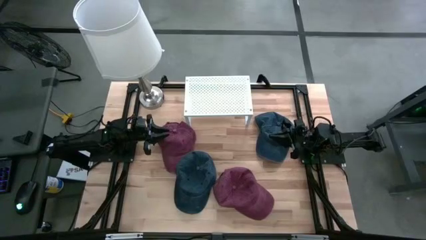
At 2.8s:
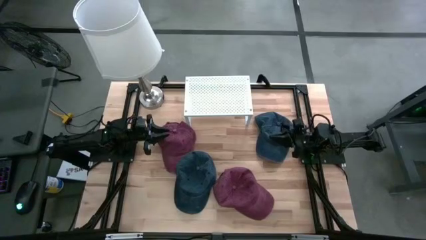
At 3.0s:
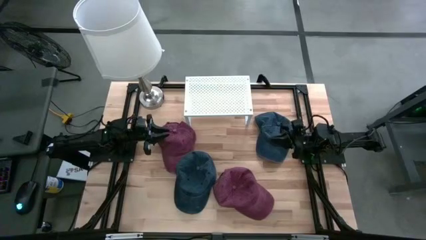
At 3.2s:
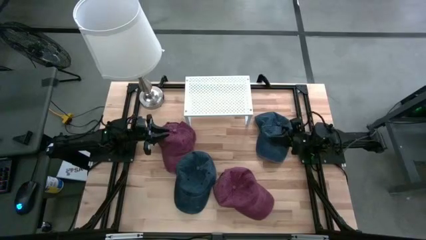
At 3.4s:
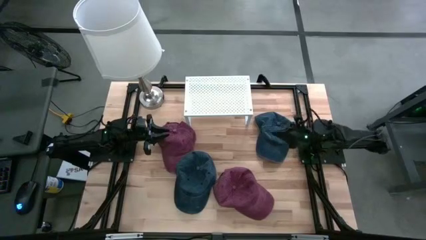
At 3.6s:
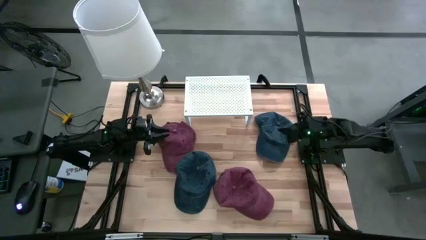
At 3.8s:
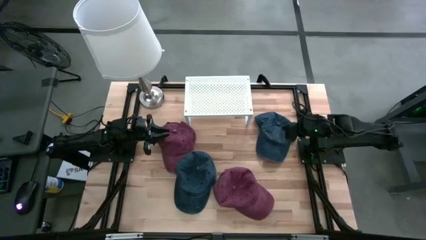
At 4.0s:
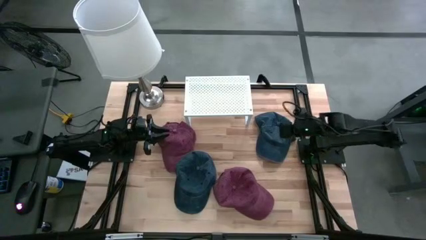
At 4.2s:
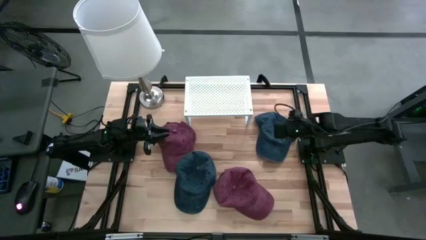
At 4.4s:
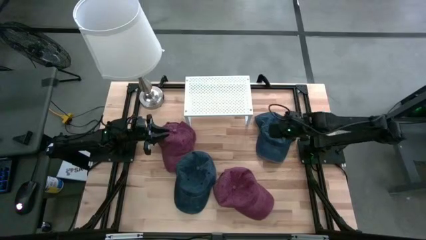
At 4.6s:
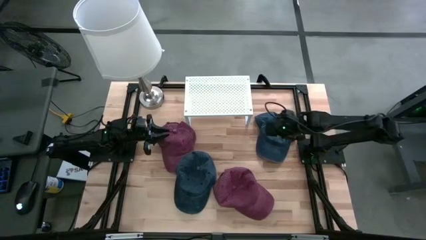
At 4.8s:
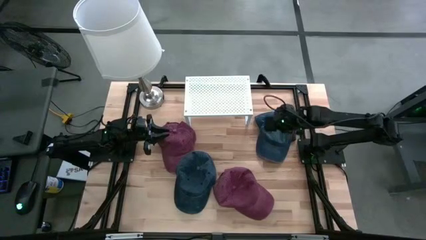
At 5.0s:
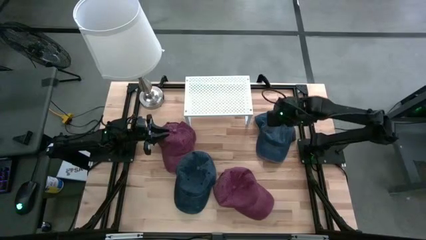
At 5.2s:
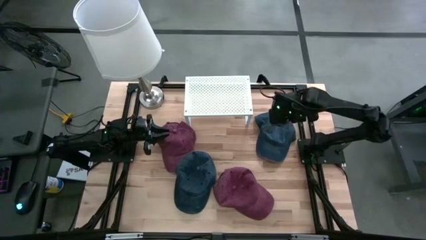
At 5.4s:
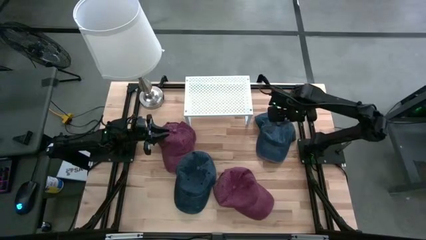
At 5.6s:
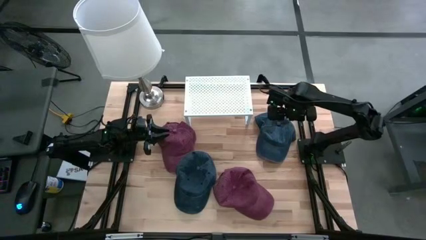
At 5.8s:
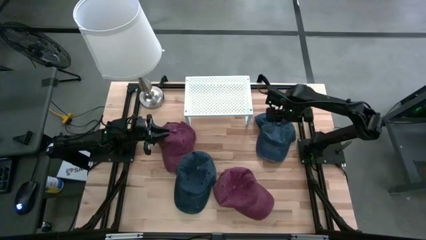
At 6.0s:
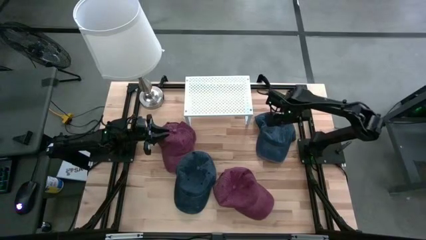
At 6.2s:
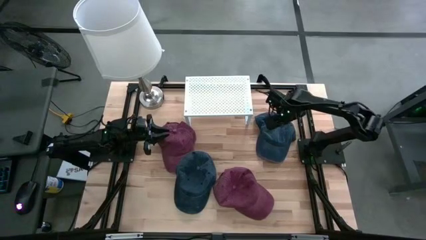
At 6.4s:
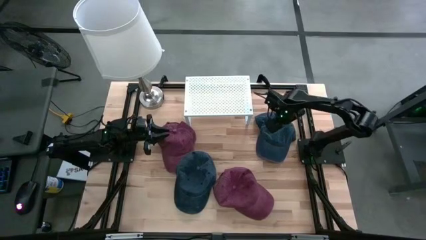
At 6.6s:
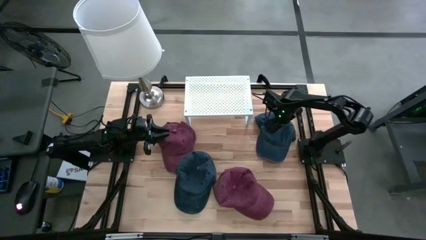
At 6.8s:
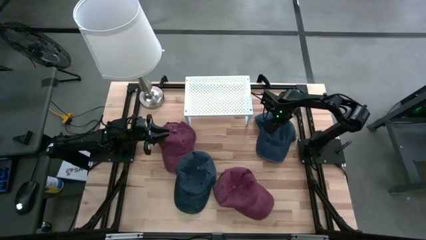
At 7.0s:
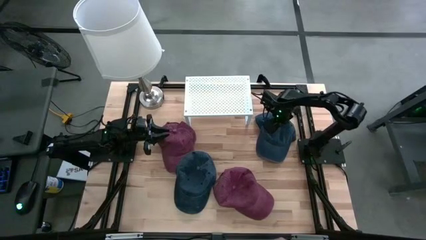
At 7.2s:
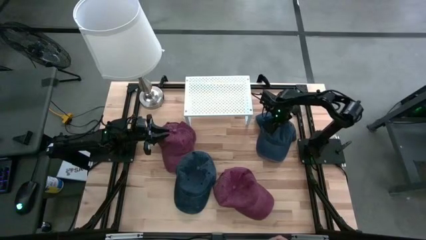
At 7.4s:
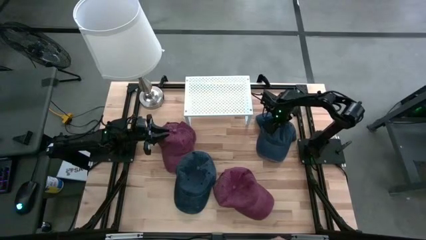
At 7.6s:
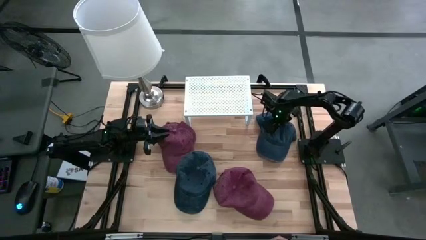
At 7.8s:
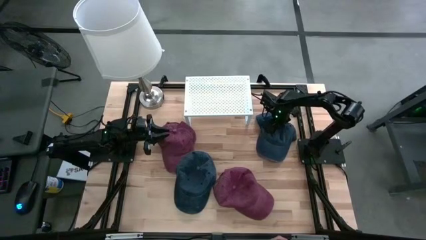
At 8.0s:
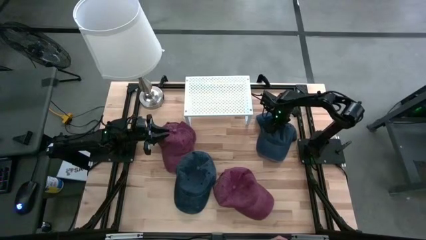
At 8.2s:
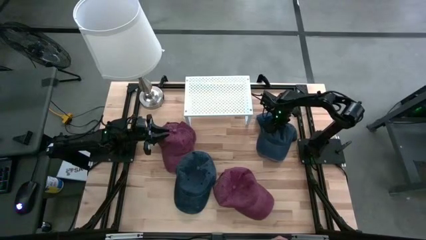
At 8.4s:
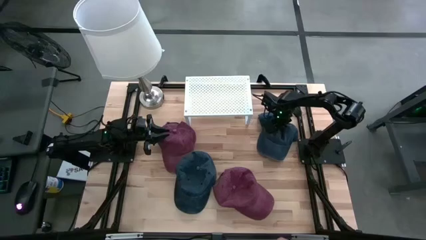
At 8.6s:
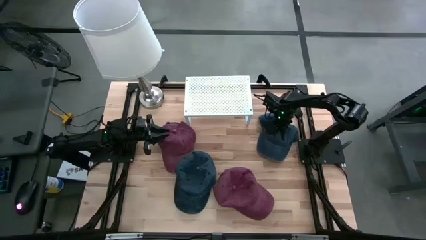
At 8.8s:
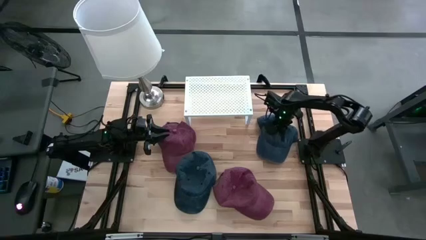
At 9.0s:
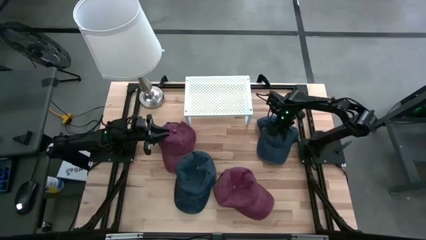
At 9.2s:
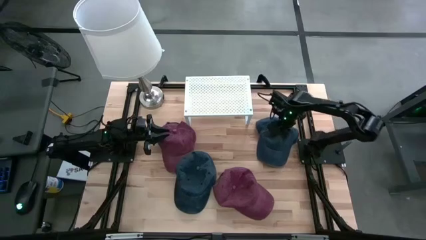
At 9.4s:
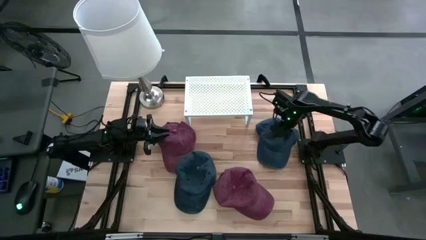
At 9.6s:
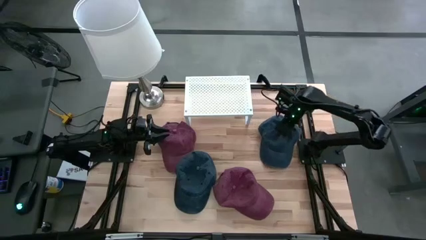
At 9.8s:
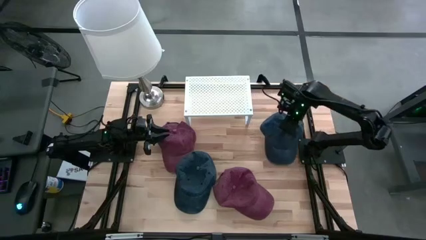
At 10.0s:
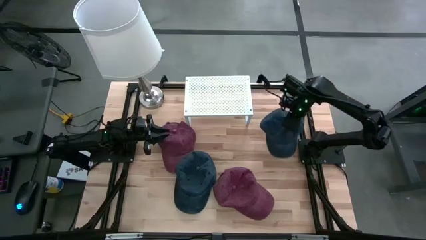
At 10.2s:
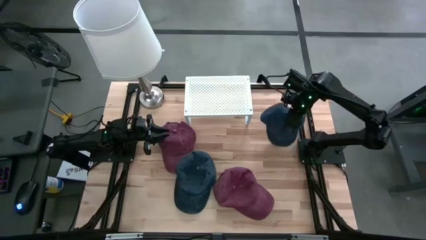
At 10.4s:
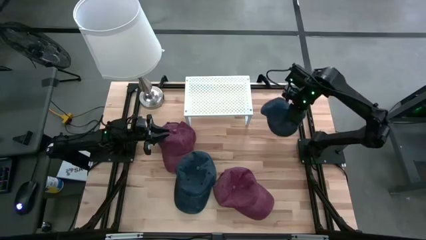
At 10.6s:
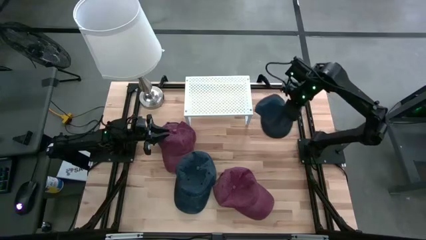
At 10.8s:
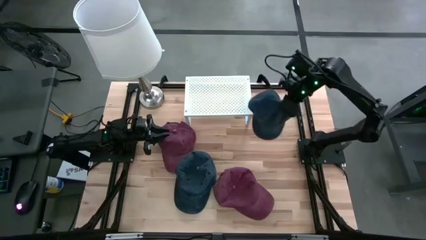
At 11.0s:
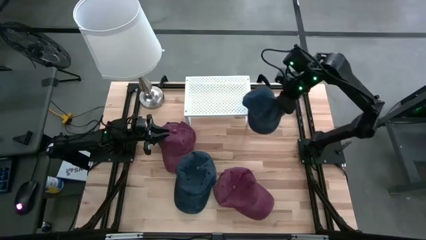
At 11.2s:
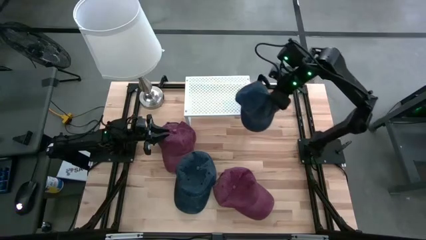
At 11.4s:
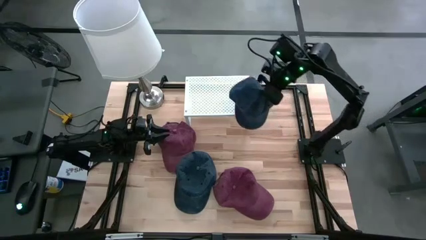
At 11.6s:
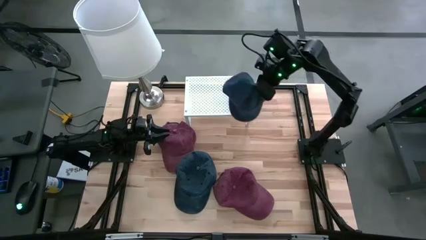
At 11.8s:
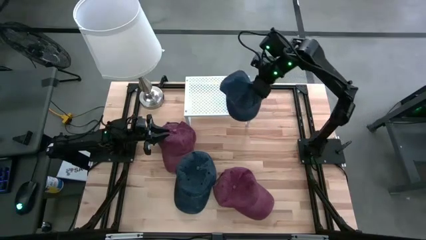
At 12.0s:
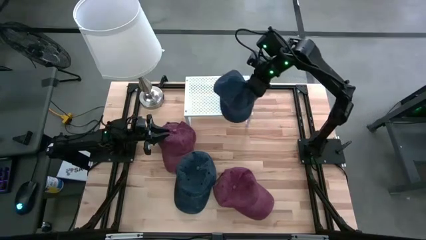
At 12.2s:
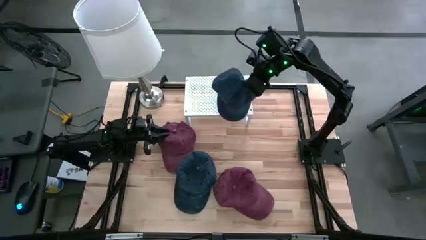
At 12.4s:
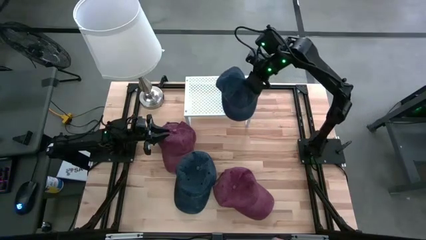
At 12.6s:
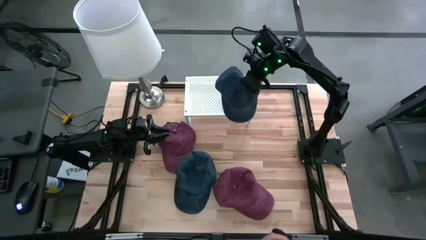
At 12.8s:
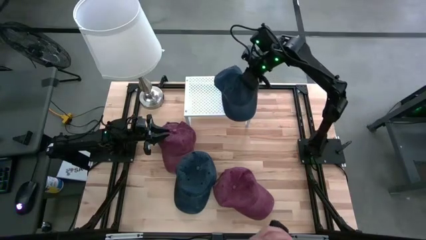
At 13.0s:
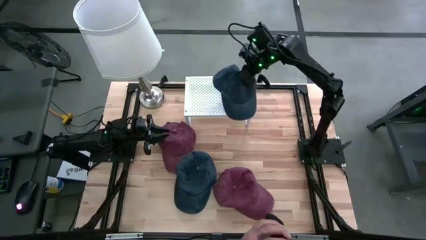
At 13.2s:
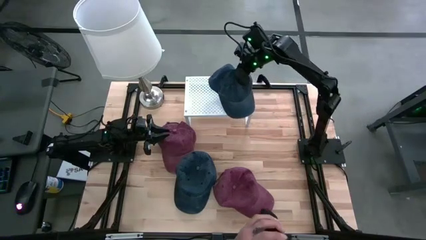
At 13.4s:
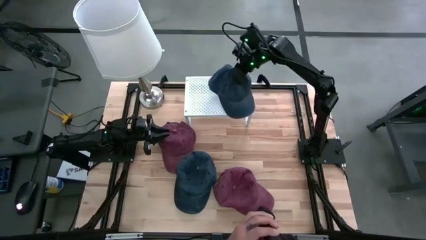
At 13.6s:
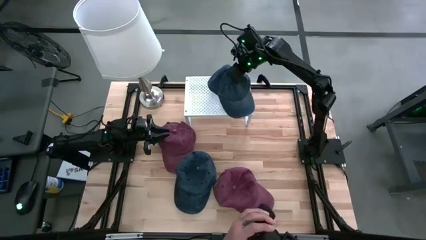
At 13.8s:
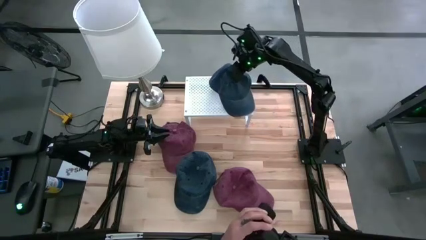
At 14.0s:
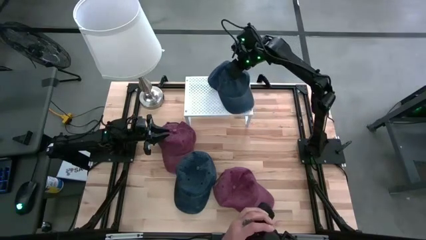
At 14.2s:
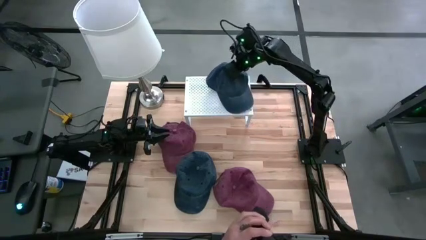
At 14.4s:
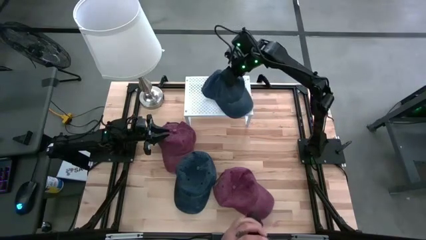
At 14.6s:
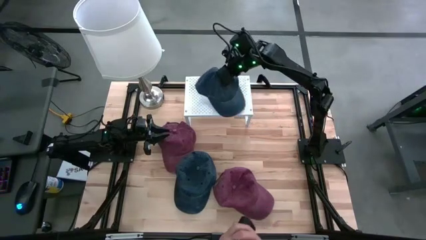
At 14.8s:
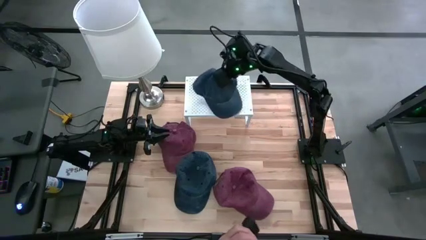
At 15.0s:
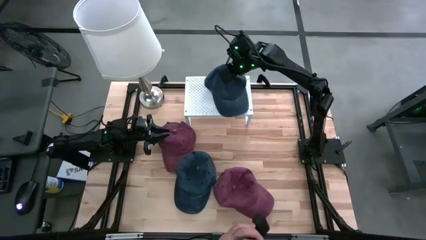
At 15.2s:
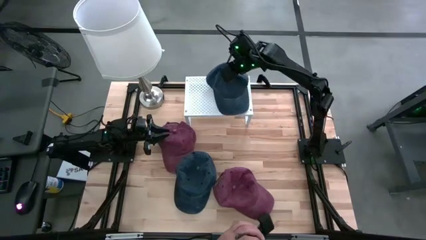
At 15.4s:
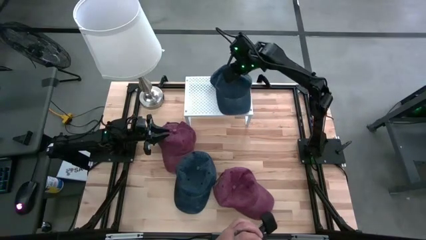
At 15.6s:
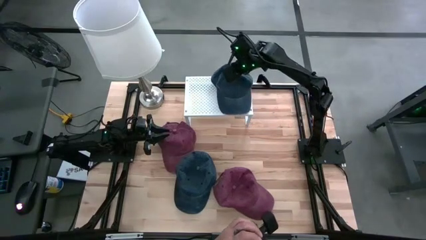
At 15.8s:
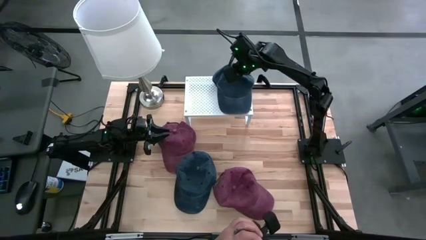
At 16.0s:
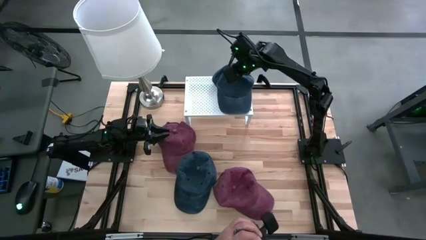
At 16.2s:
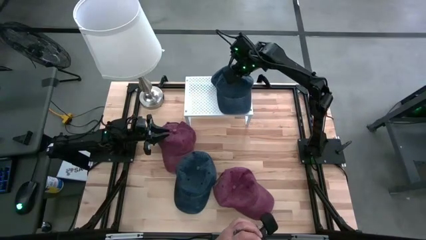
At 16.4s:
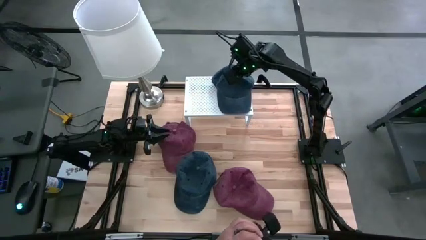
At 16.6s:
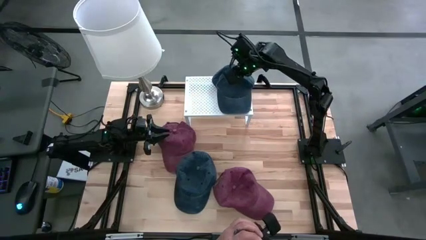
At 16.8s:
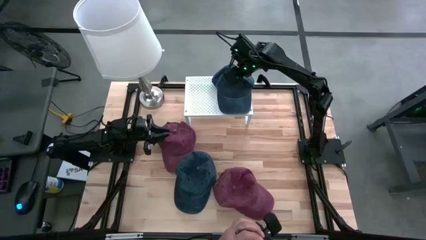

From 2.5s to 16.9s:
Task: Pick & Place hat
Put the top blue cap on the shelf
